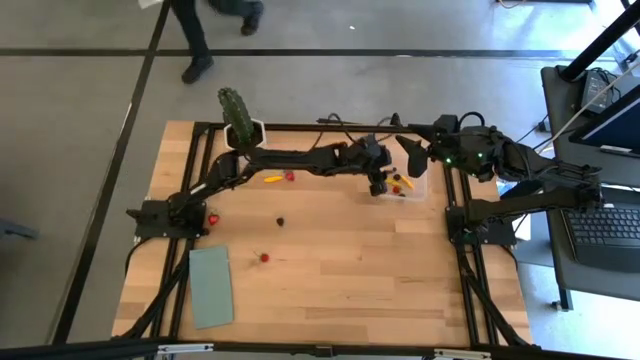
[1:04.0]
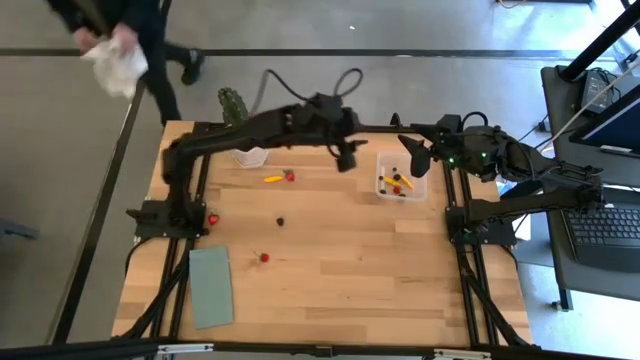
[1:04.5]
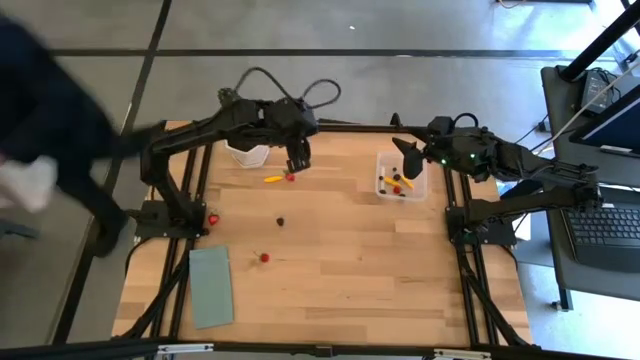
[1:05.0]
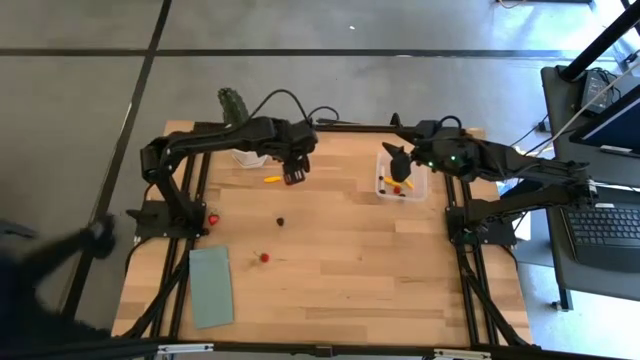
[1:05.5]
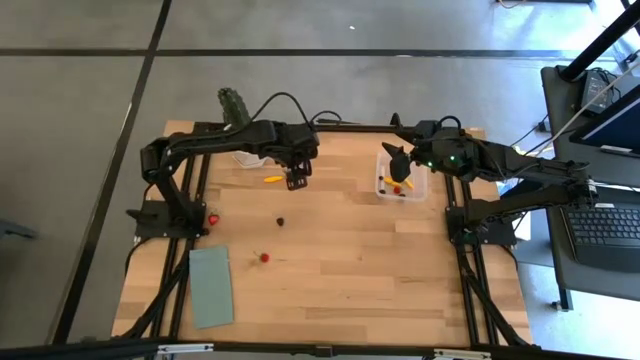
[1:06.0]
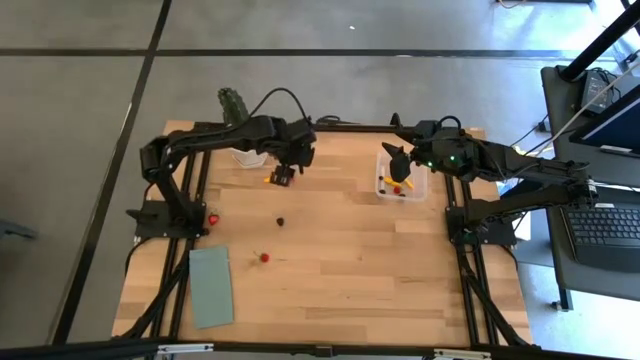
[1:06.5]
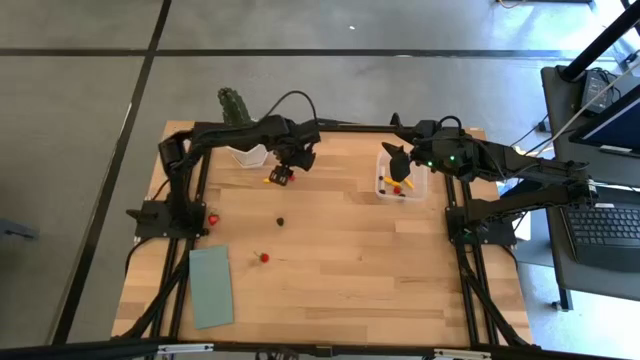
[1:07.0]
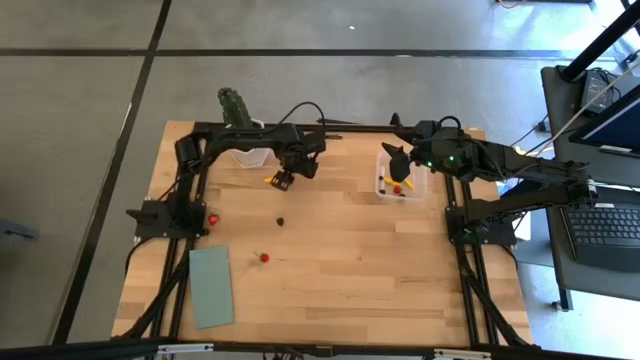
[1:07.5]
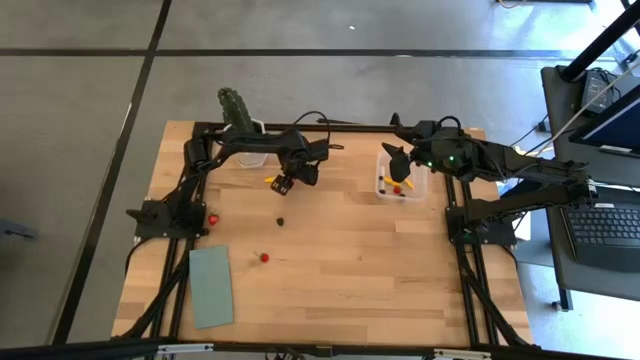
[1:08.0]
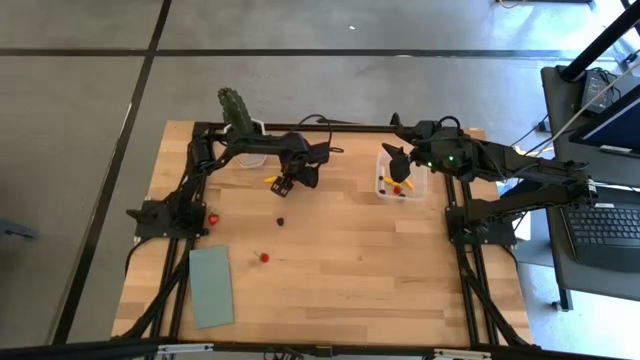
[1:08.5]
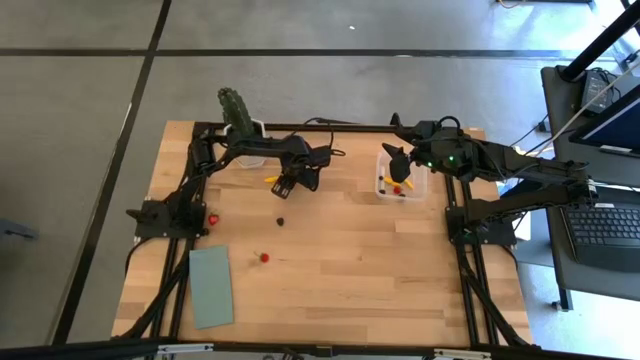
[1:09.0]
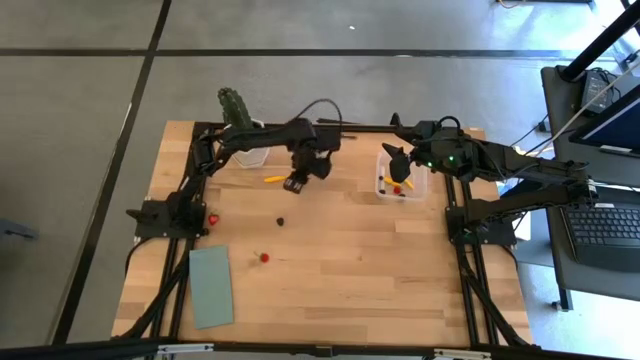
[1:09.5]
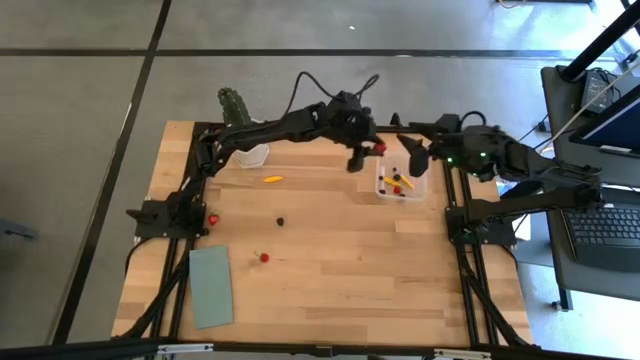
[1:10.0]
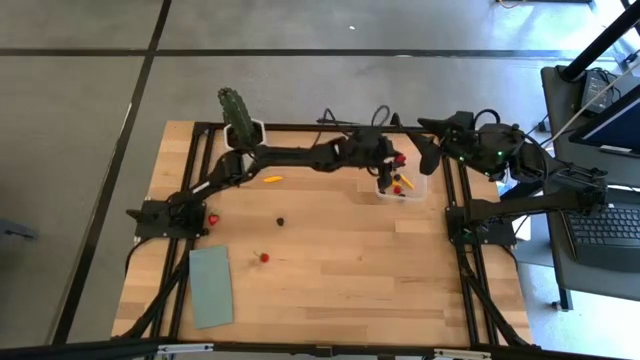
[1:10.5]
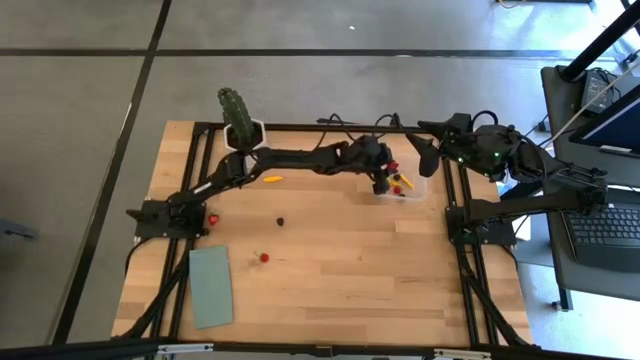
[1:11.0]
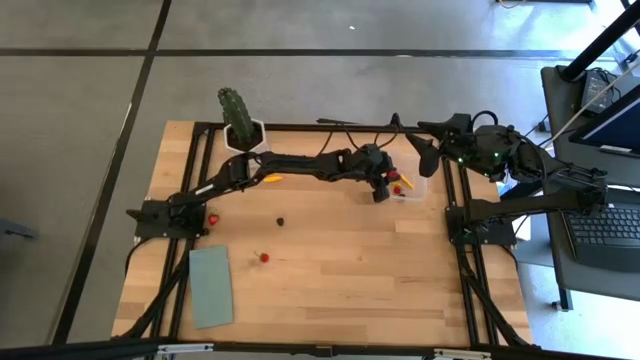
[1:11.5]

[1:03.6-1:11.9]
Task: Pick and placing Produce into tupperware
Put the top red strawberry into the transparent bin

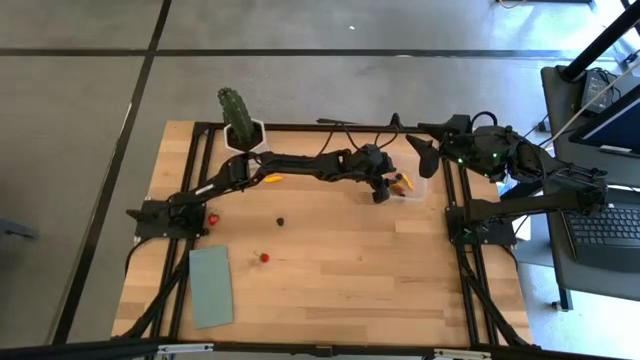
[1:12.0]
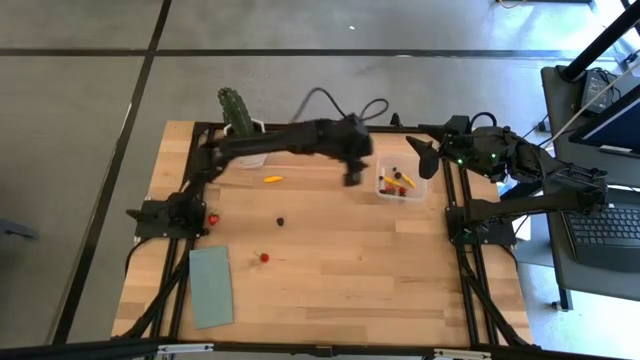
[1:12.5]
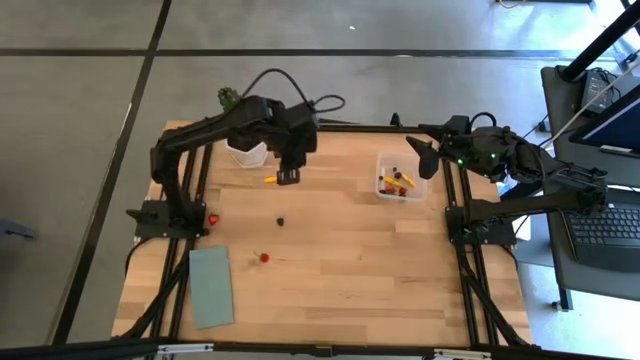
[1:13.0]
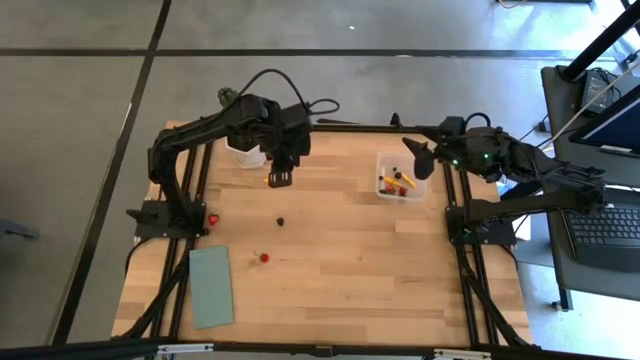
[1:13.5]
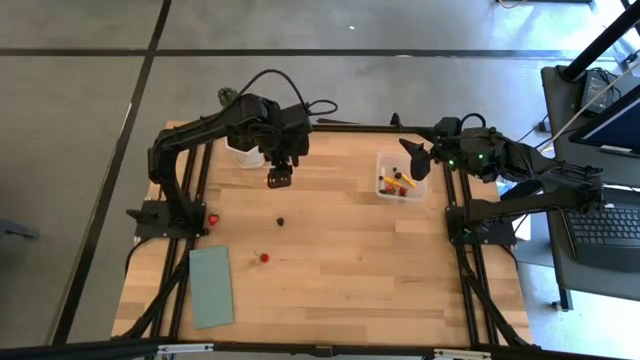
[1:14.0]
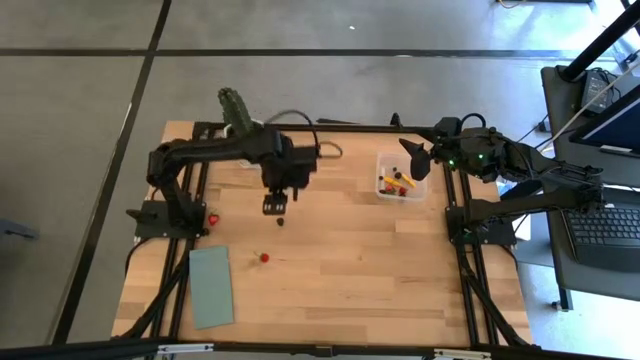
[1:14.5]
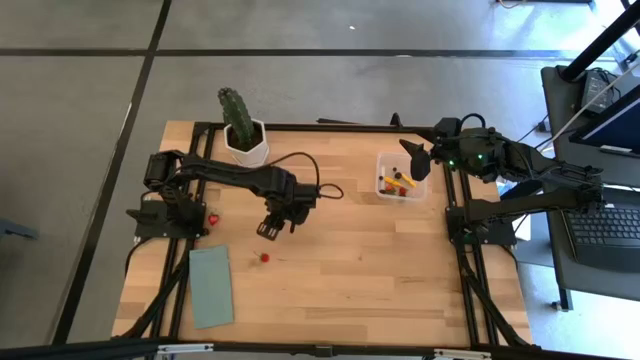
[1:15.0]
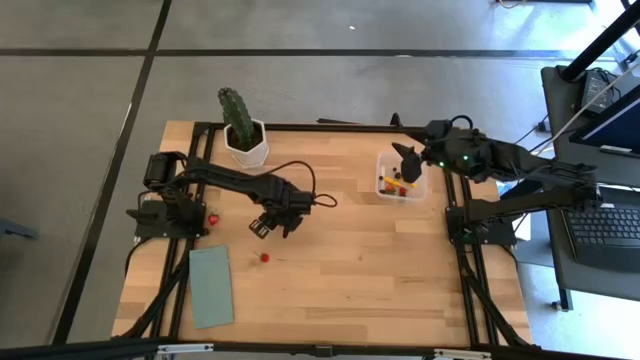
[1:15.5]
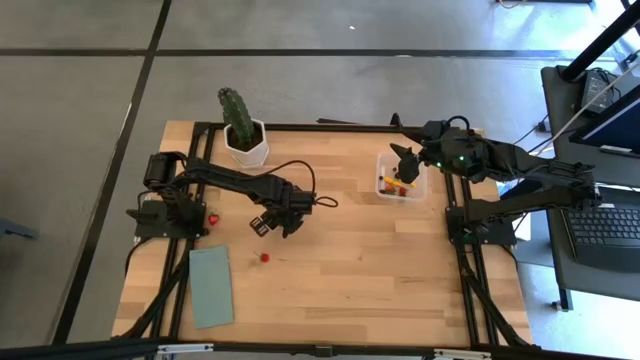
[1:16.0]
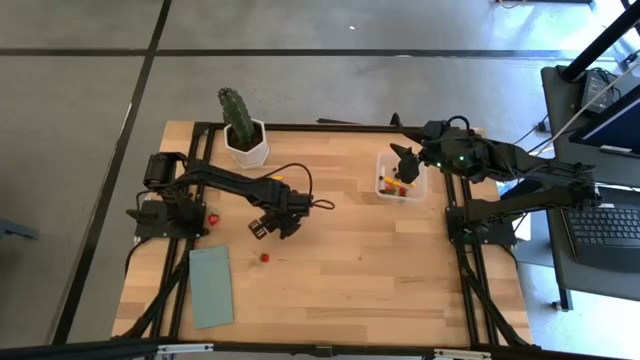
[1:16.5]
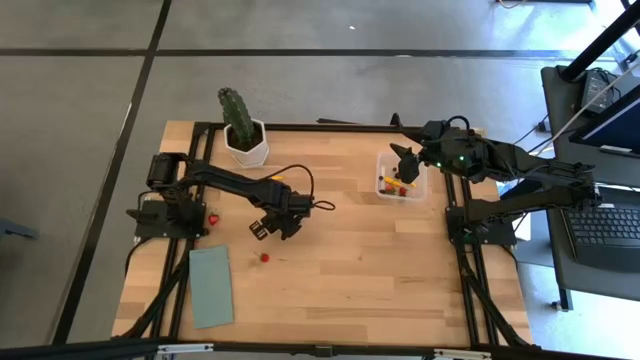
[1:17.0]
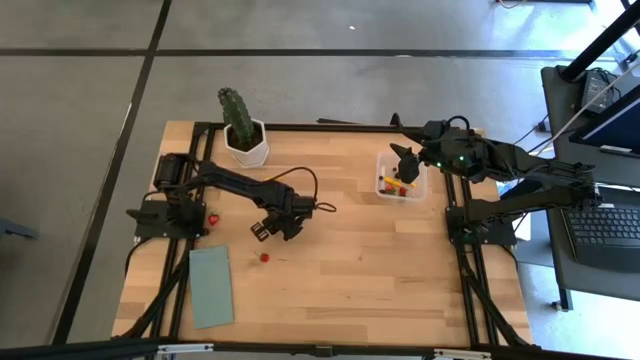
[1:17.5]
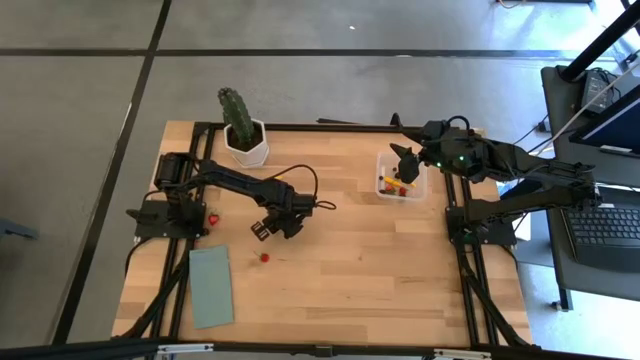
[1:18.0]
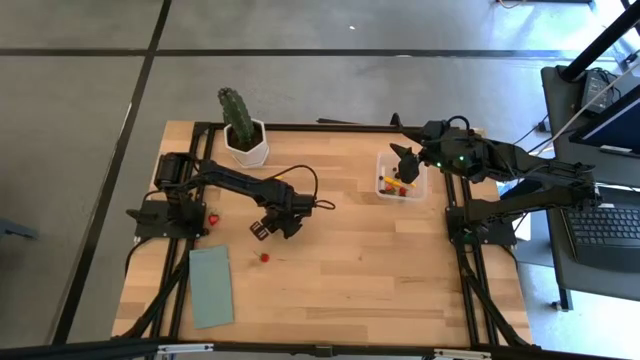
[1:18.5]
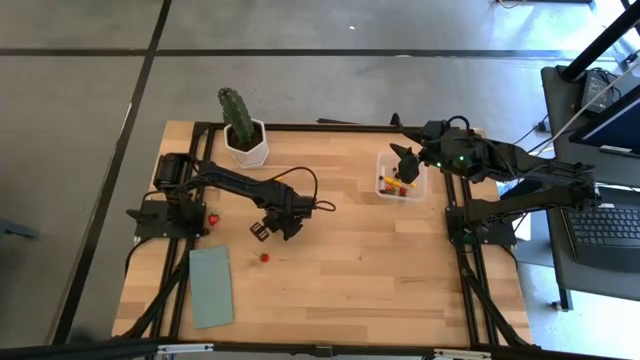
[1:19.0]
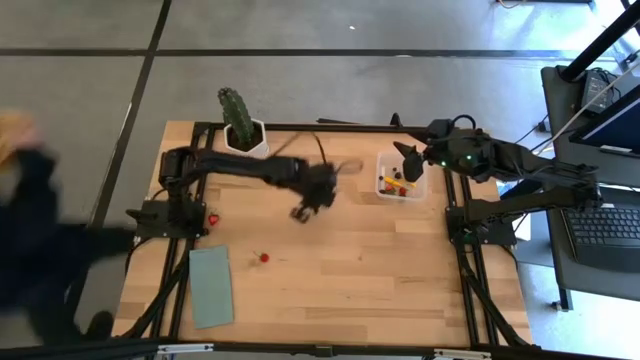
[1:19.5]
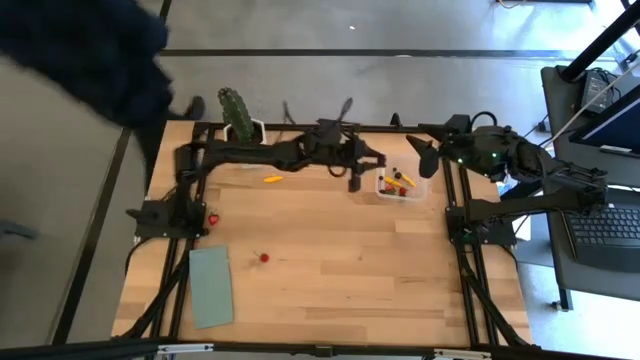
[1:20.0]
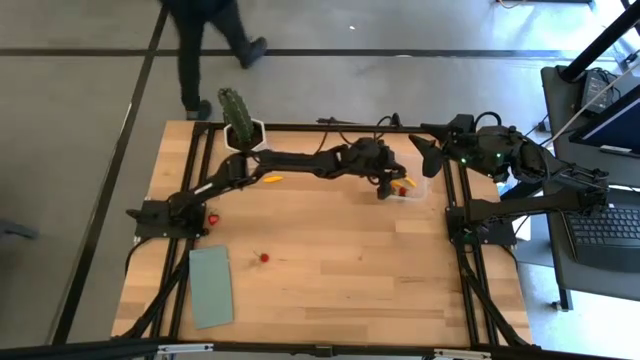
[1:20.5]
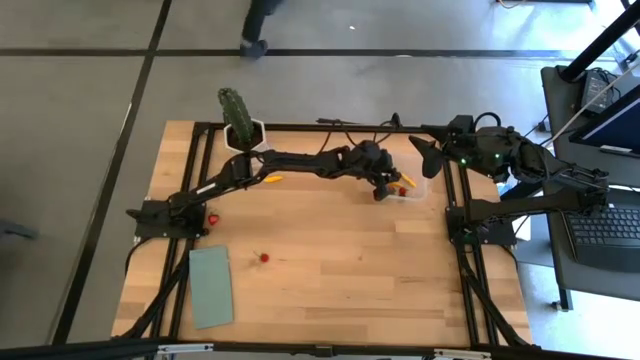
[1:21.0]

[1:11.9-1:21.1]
Put the black berry into the transparent bin

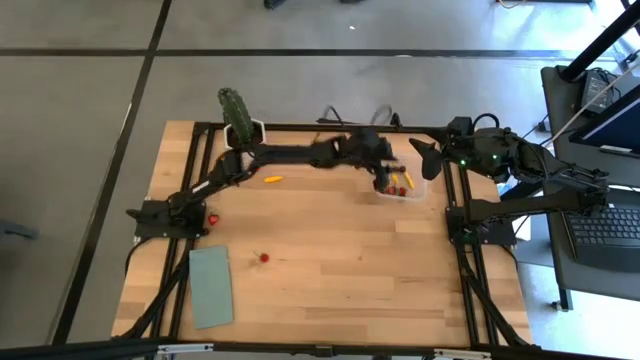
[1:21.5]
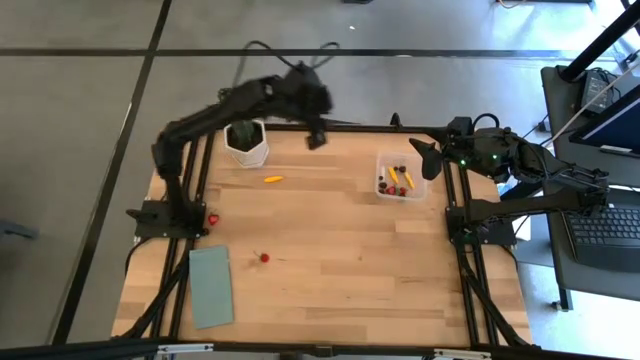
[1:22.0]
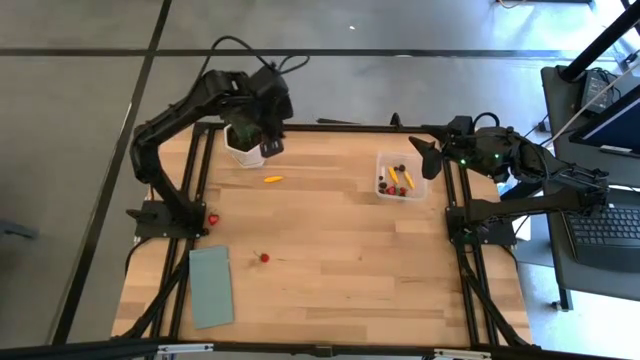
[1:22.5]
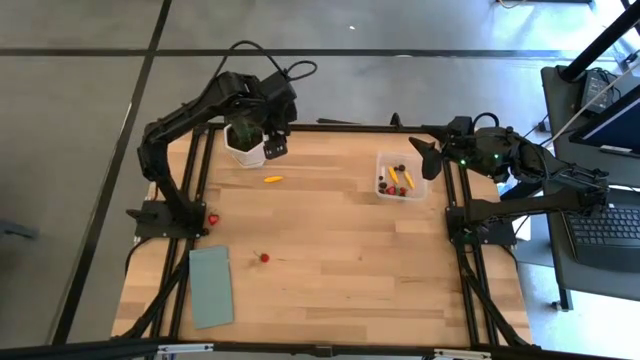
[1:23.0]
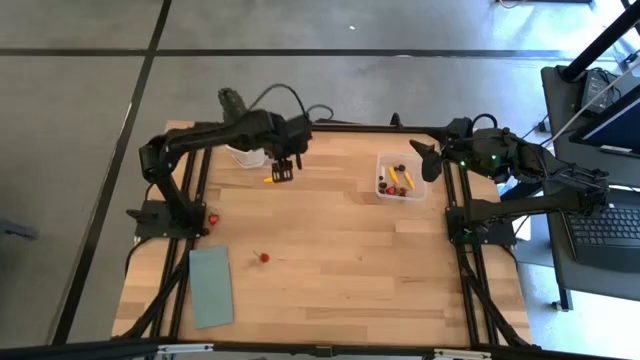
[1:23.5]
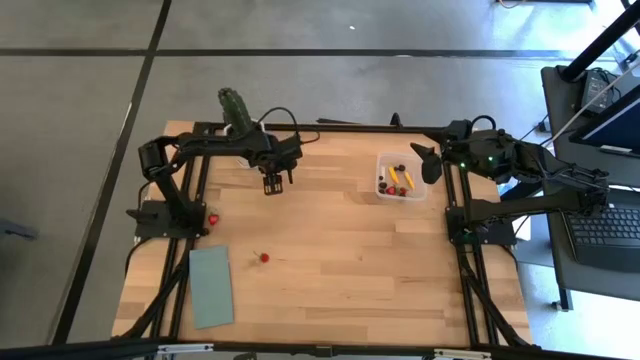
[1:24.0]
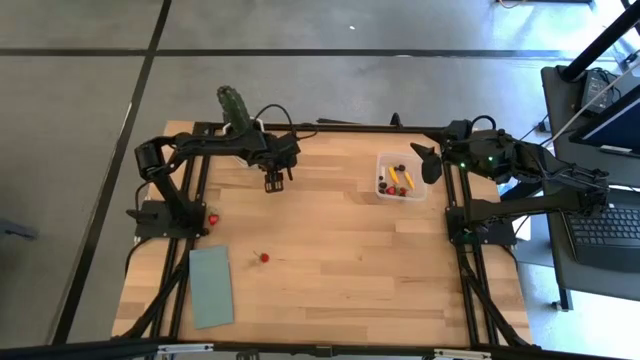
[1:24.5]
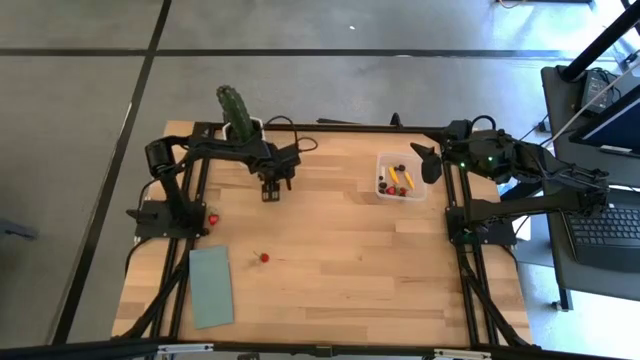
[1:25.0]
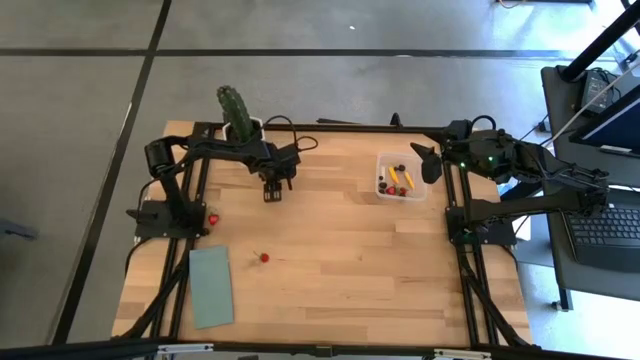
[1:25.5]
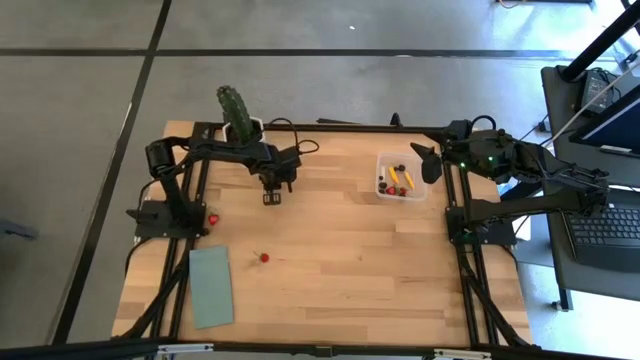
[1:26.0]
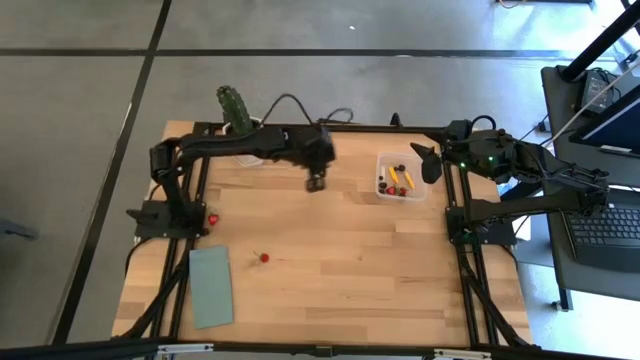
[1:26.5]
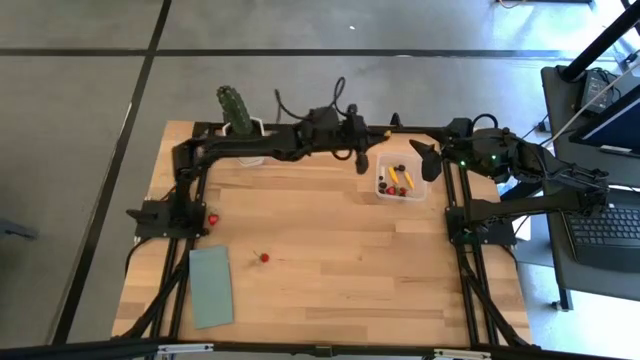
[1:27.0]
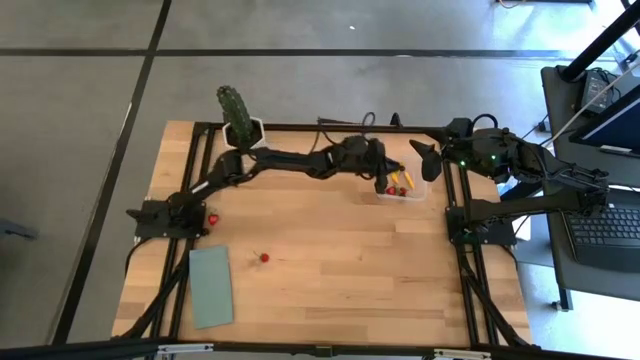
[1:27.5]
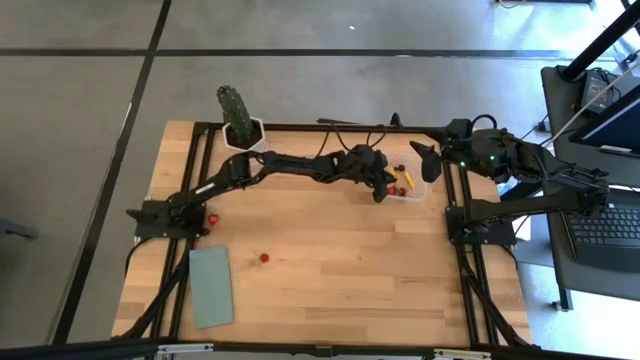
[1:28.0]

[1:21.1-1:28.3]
Put the yellow corn into the transparent bin
